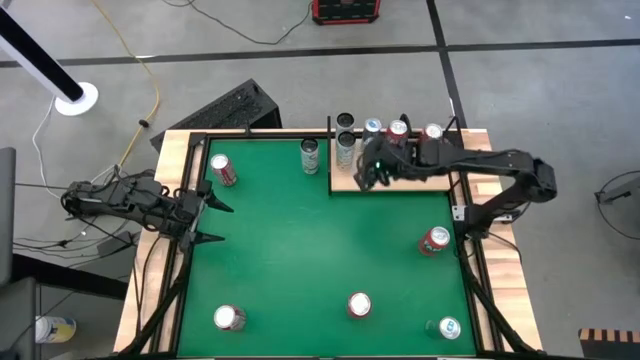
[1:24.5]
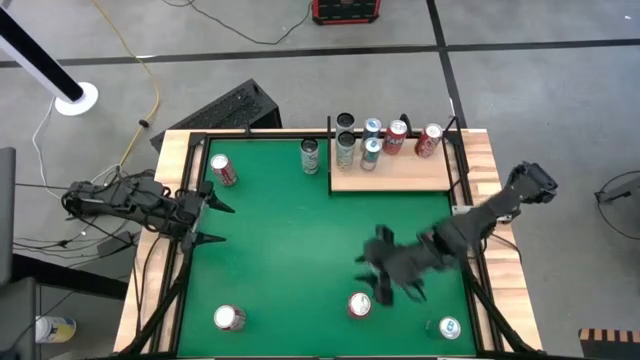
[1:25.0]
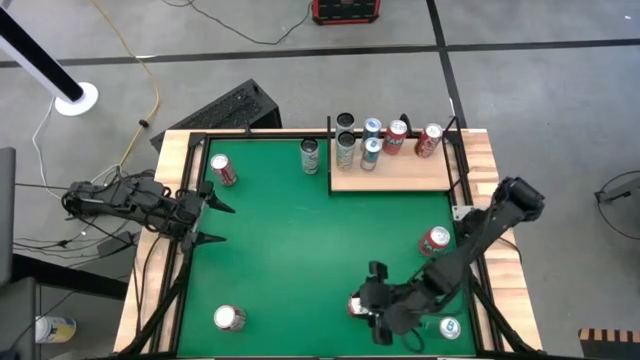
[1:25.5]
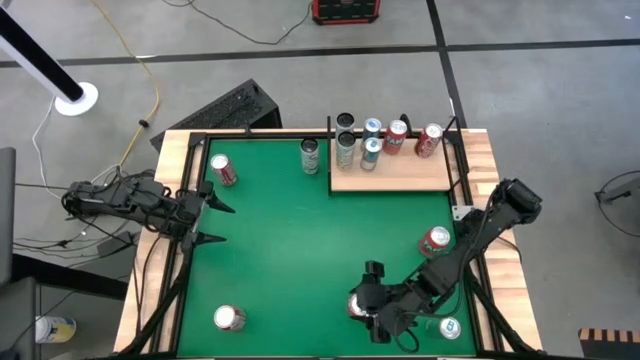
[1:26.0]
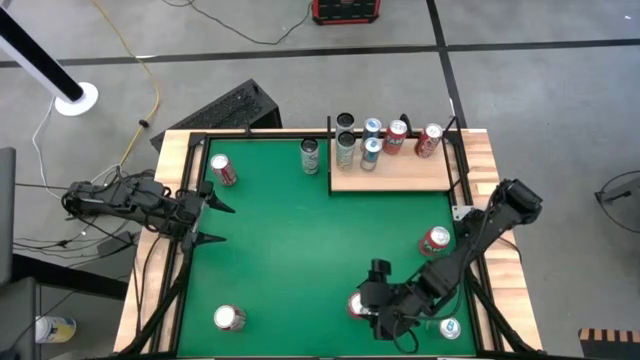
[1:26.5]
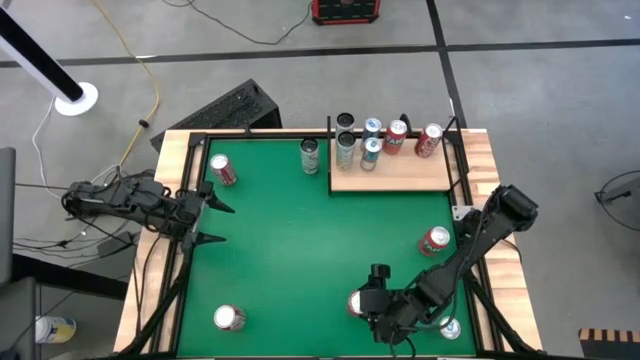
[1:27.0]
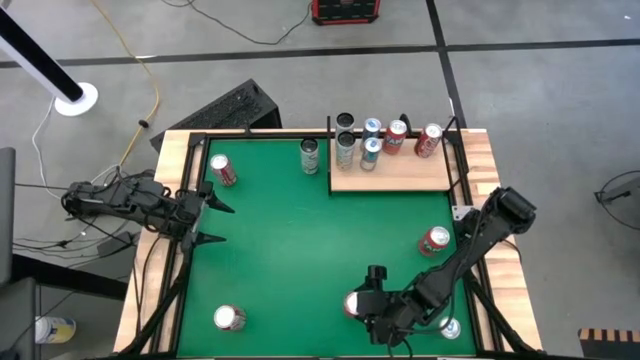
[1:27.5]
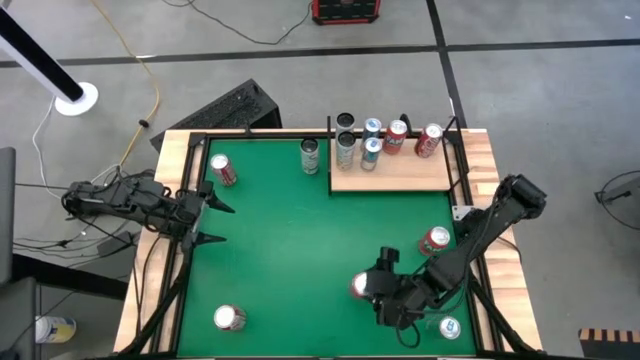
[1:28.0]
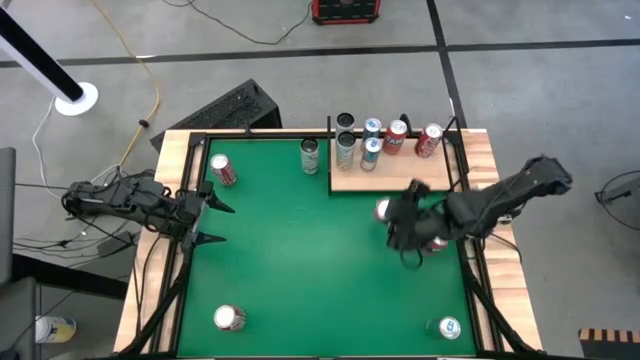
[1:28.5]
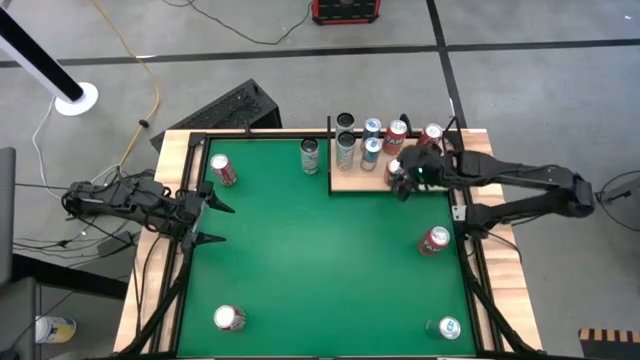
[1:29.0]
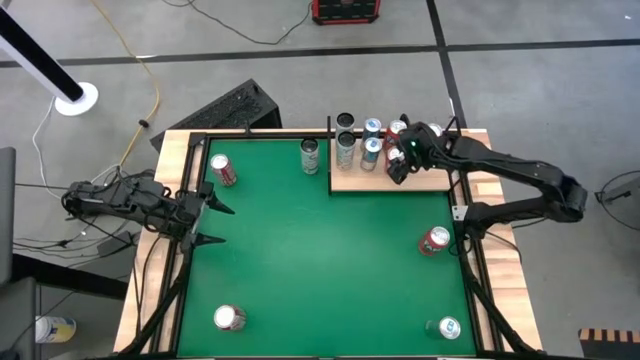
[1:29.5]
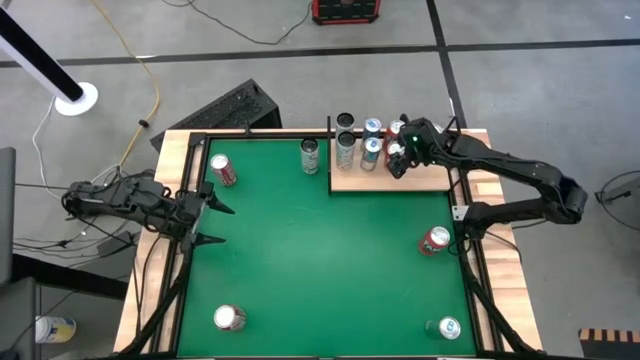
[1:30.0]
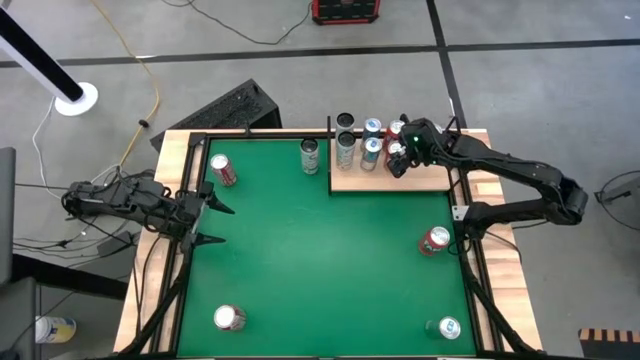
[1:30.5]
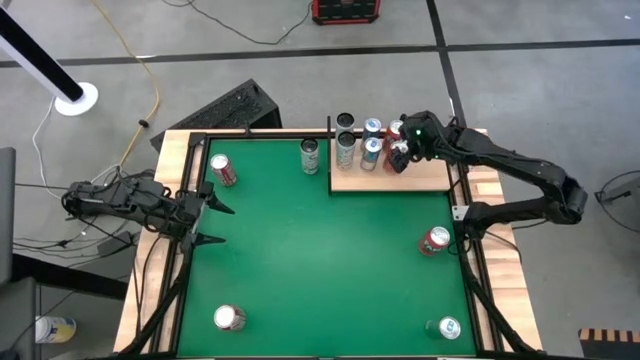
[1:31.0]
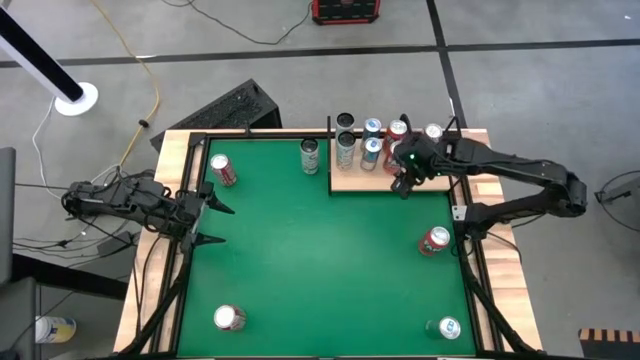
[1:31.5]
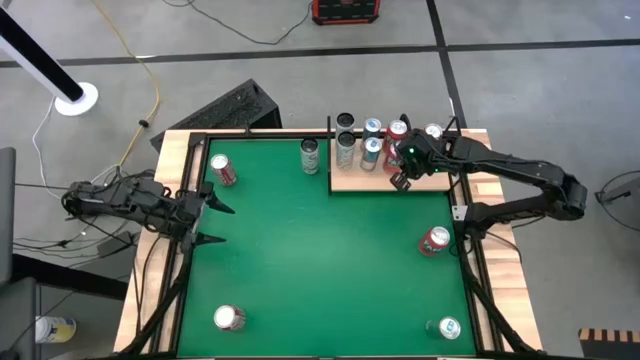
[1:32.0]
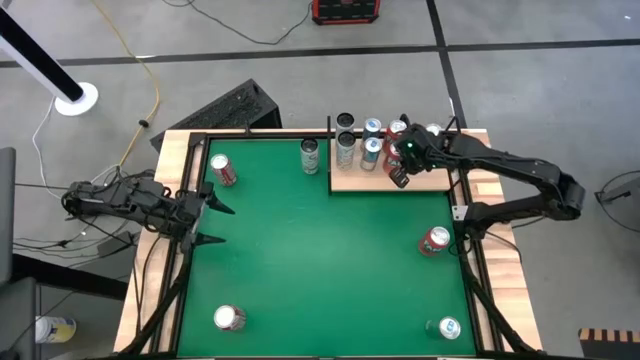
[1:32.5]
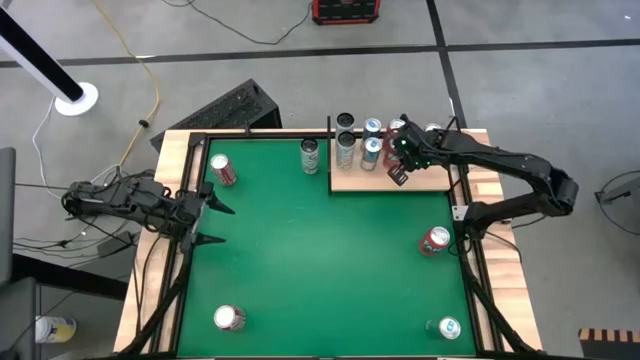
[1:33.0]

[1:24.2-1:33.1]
Task: Sort soda cans
Put the bottom orange soda can on the shelf align with the other orange soda can

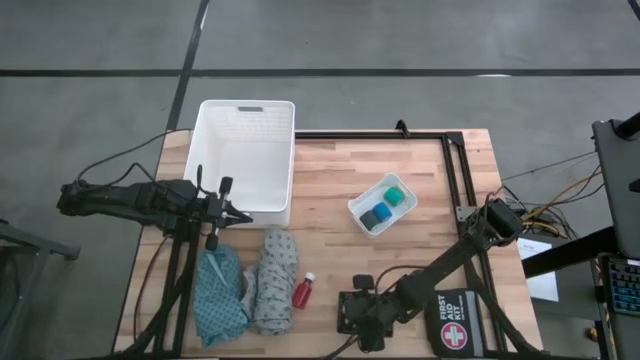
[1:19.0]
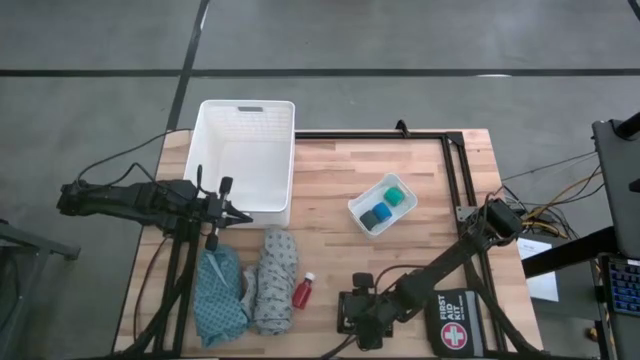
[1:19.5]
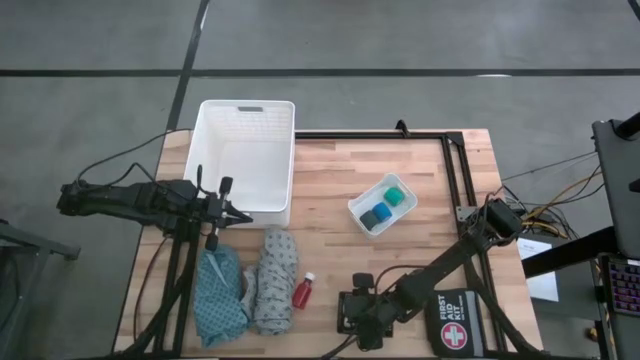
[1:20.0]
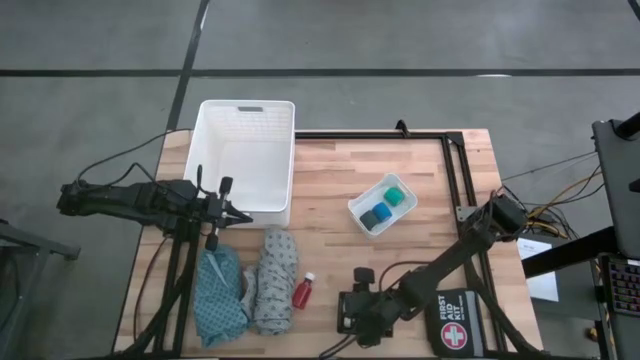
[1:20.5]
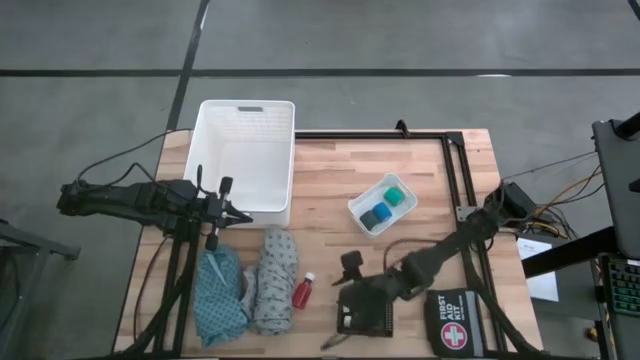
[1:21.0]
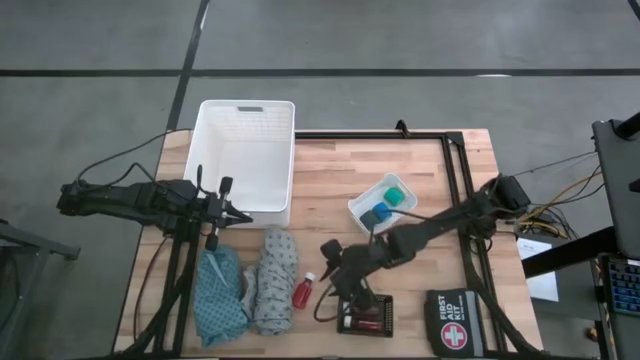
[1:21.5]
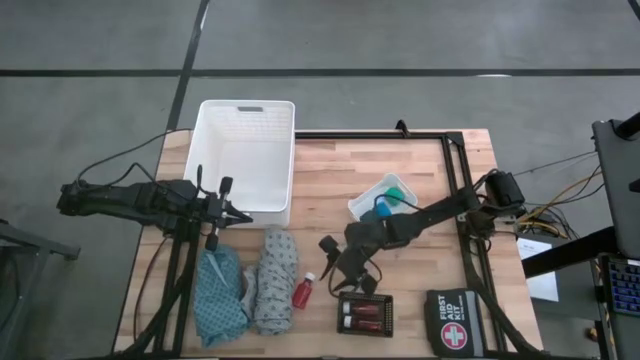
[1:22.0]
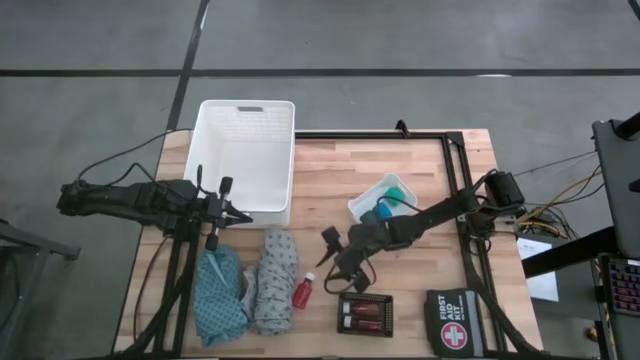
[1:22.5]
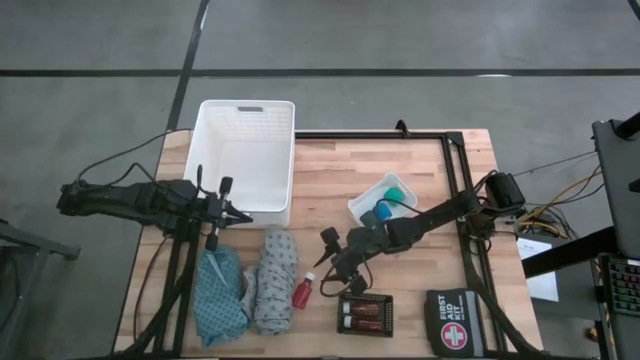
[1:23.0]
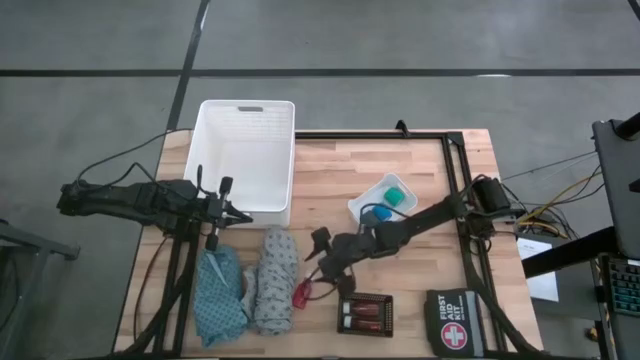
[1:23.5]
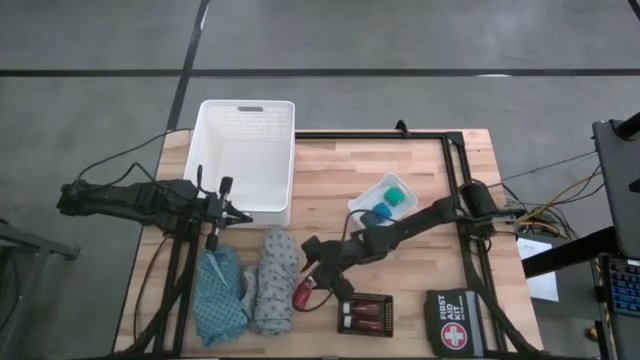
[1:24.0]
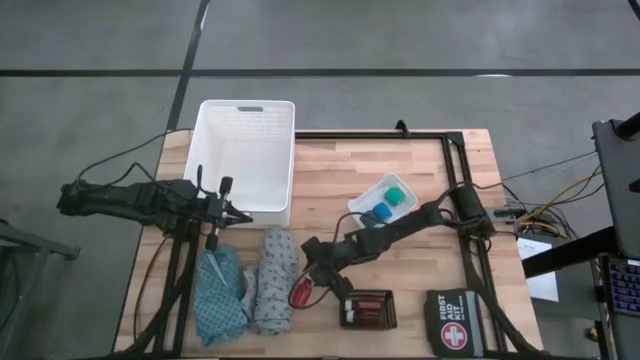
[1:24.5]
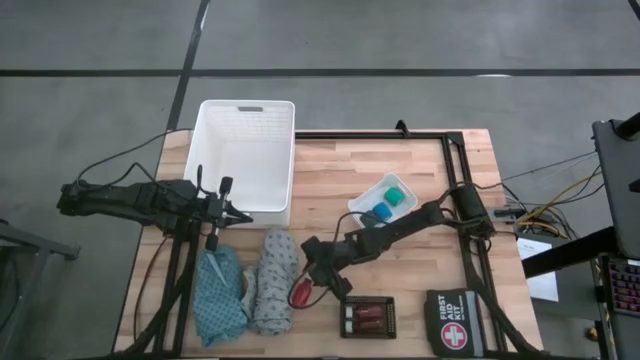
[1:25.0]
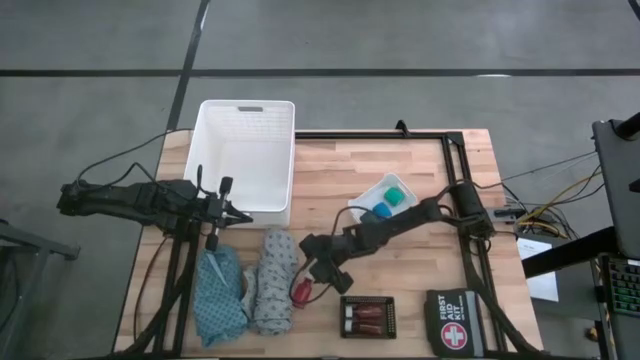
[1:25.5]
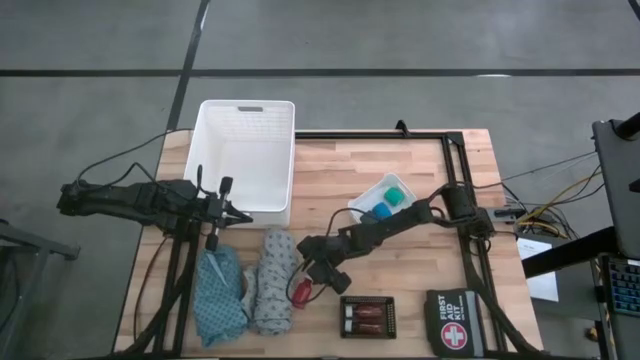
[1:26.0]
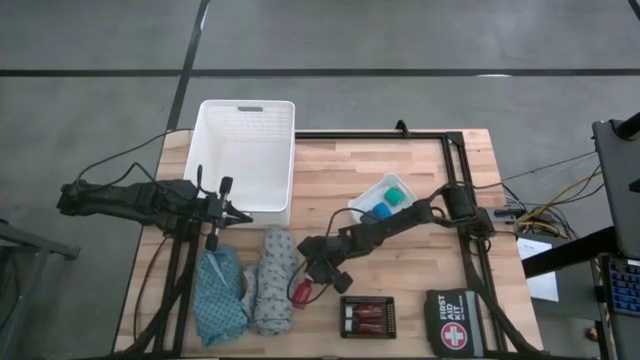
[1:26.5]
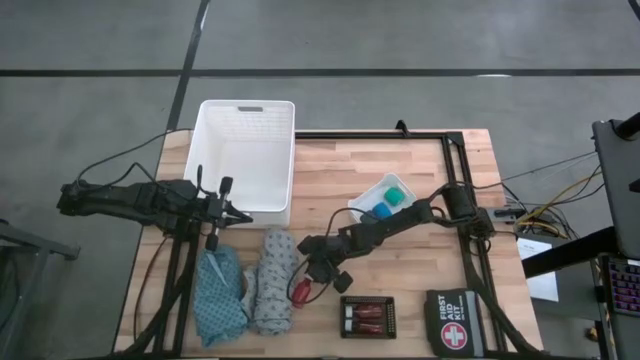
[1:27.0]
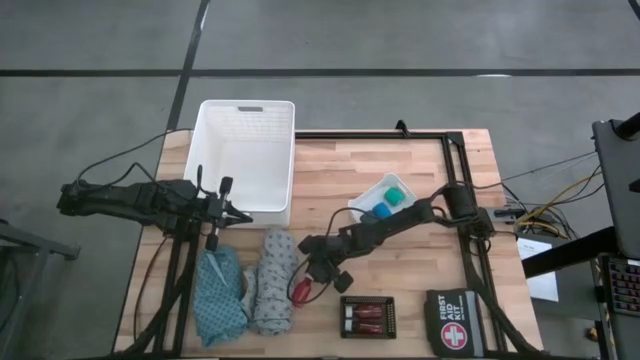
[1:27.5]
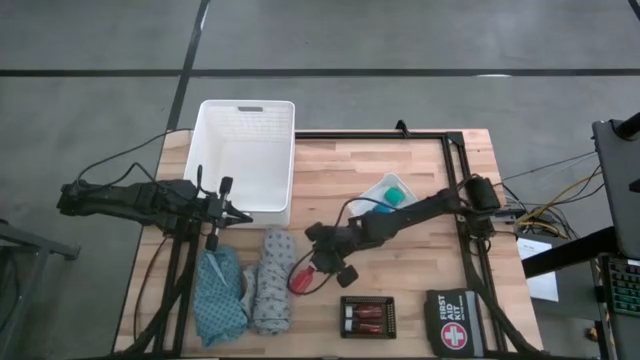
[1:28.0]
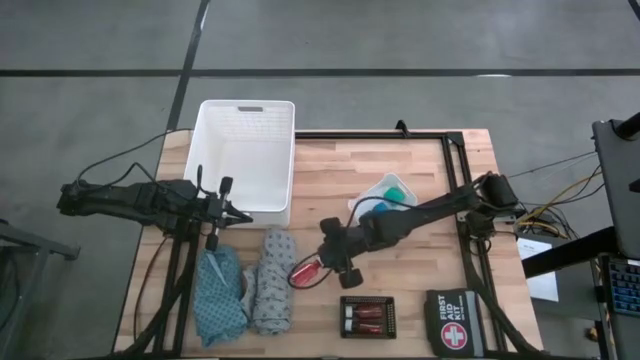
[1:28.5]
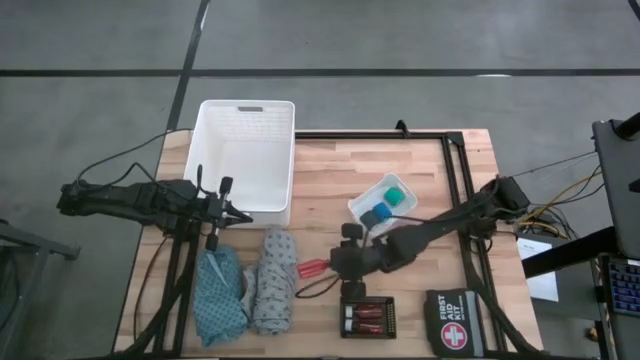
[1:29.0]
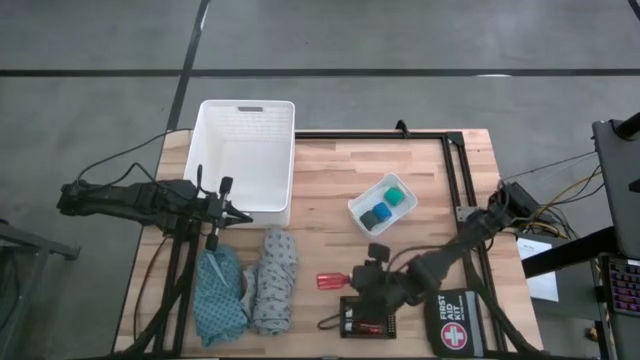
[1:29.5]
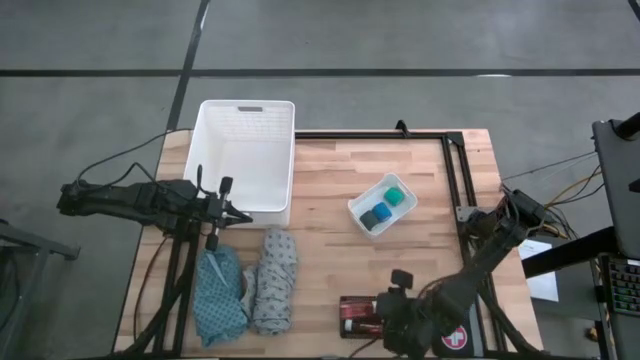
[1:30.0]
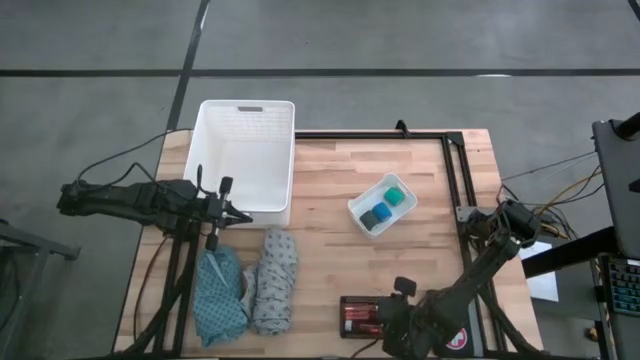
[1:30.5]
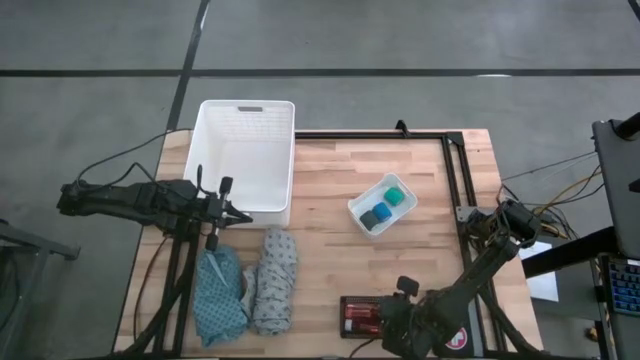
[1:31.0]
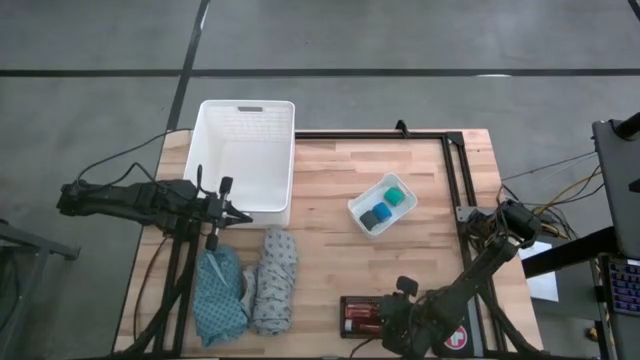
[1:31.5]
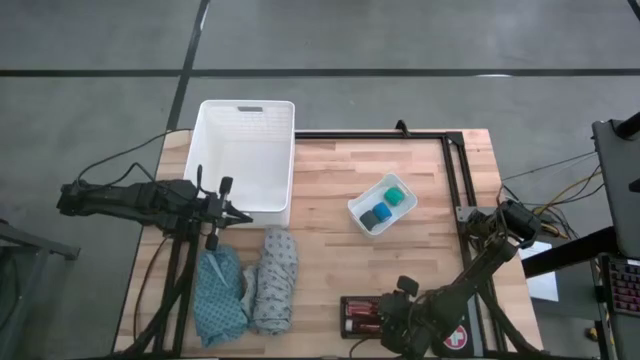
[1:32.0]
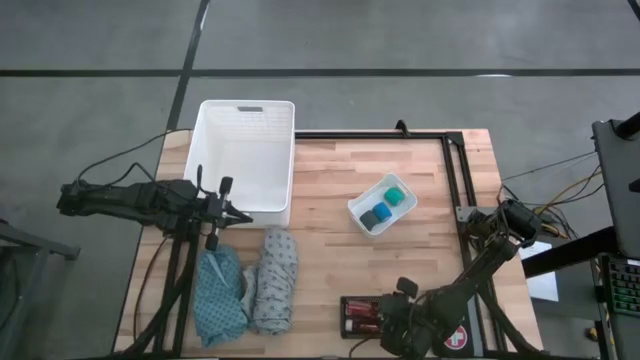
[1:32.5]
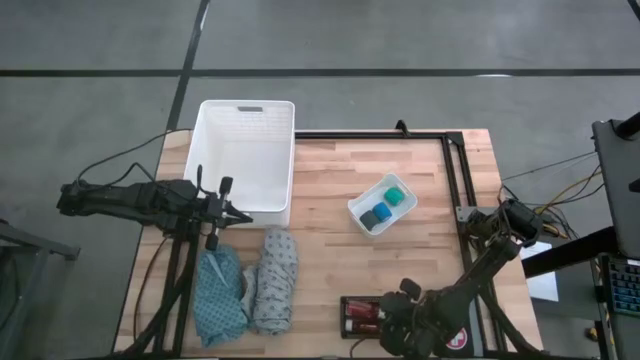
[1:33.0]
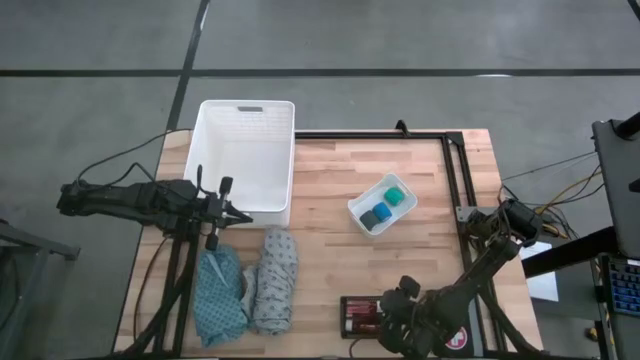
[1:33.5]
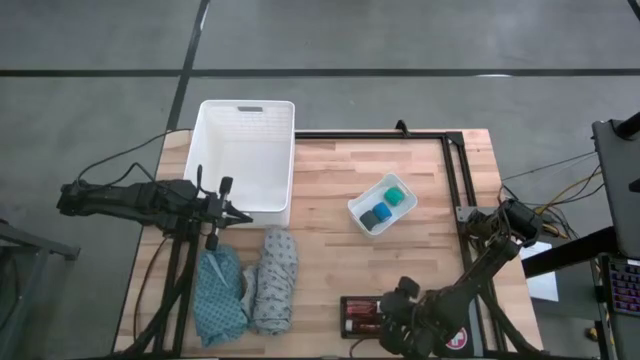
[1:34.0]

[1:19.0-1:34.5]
Task: Pick & place medical supplies in basket/bin
Put the red pill bottle into the black bin
